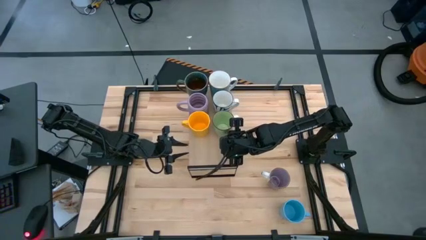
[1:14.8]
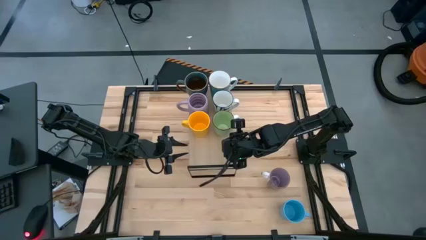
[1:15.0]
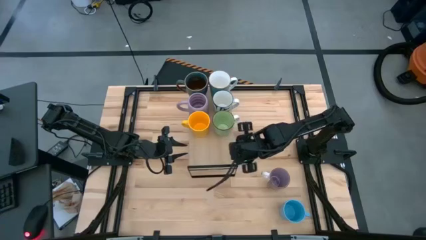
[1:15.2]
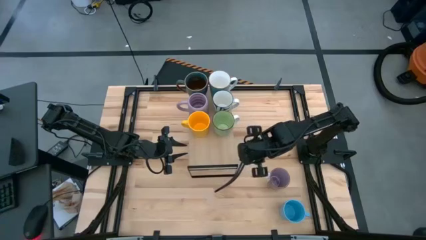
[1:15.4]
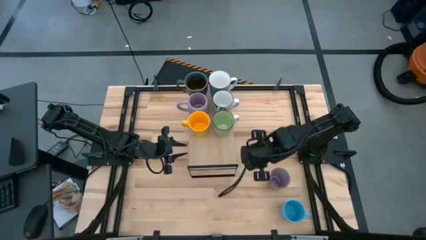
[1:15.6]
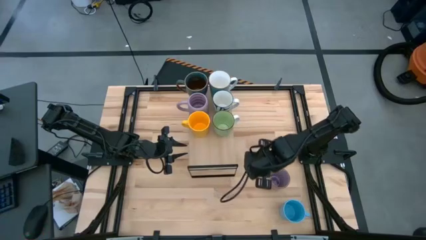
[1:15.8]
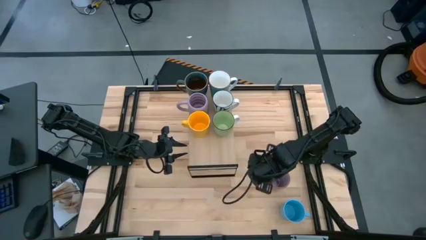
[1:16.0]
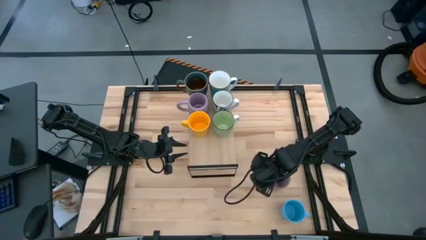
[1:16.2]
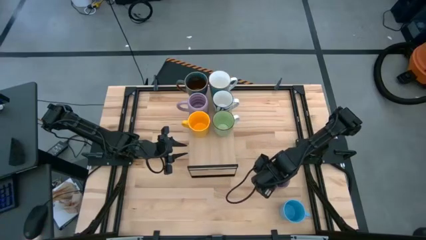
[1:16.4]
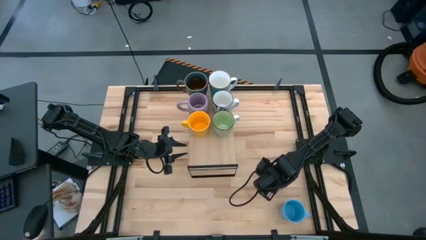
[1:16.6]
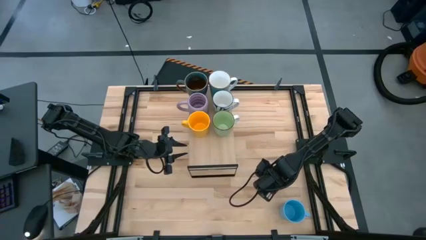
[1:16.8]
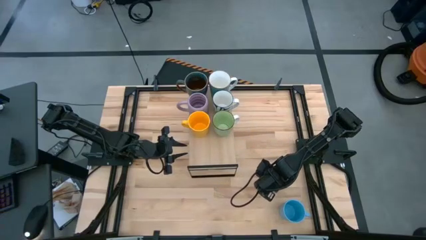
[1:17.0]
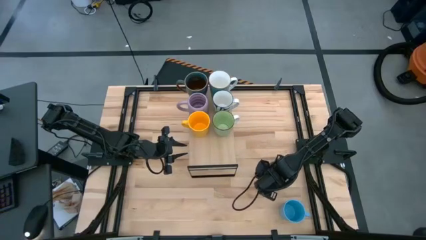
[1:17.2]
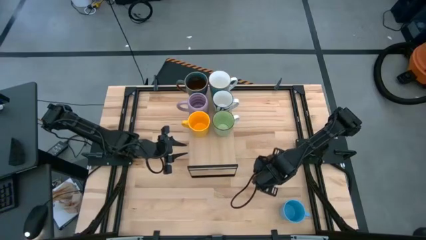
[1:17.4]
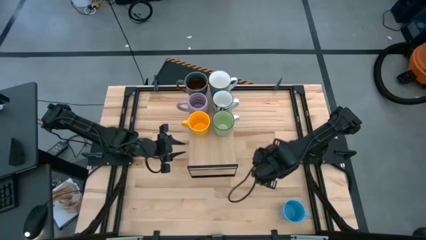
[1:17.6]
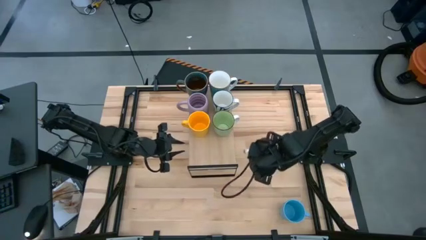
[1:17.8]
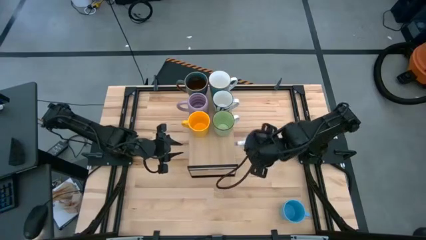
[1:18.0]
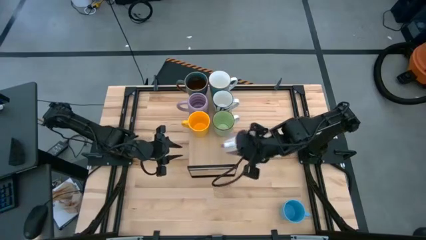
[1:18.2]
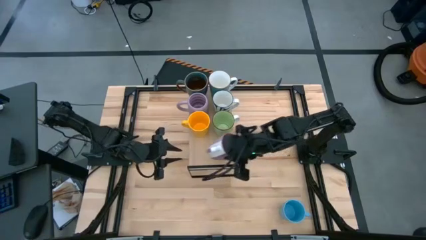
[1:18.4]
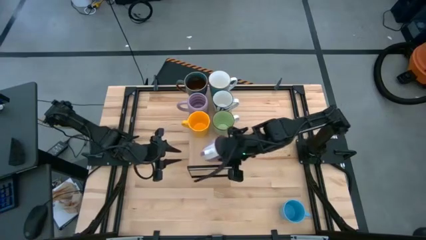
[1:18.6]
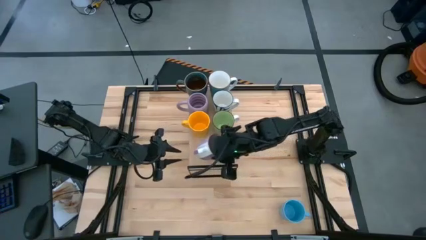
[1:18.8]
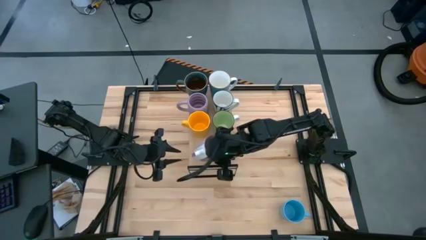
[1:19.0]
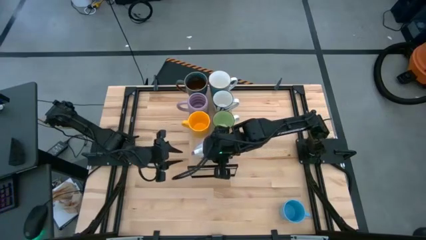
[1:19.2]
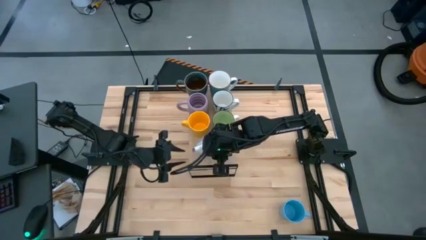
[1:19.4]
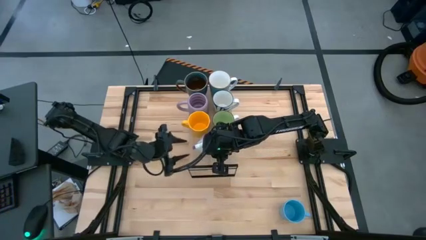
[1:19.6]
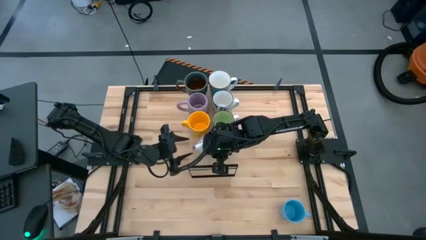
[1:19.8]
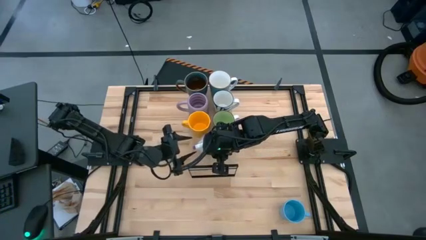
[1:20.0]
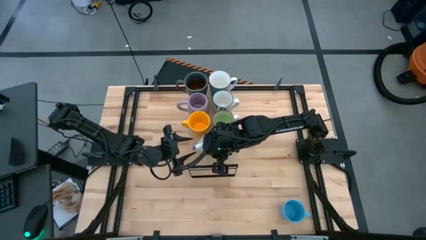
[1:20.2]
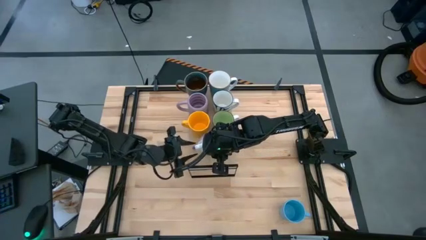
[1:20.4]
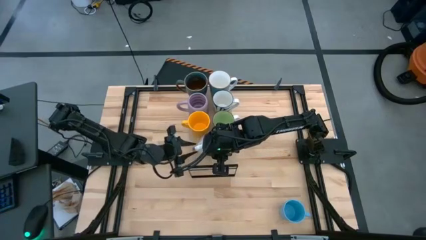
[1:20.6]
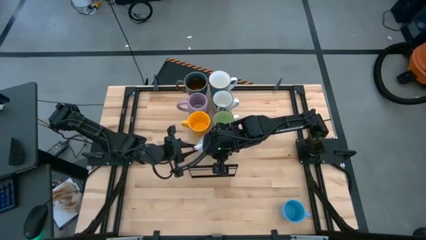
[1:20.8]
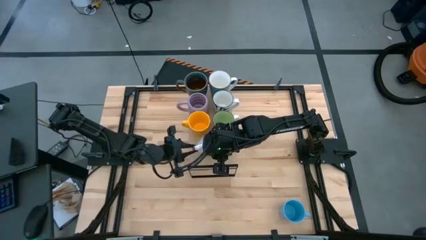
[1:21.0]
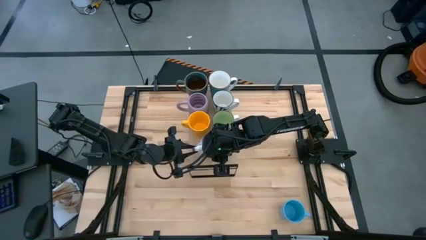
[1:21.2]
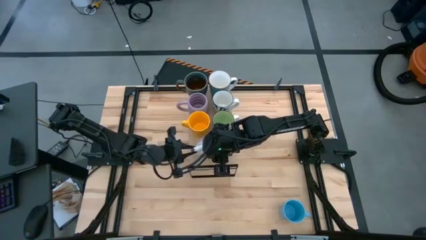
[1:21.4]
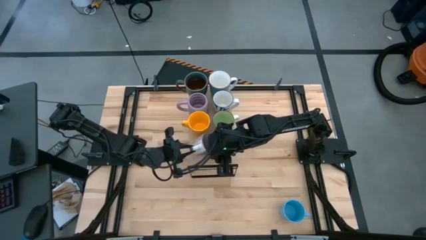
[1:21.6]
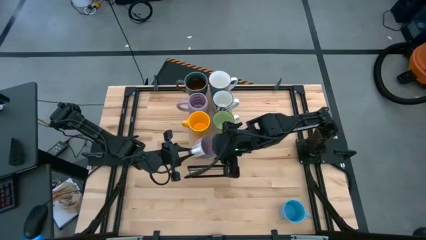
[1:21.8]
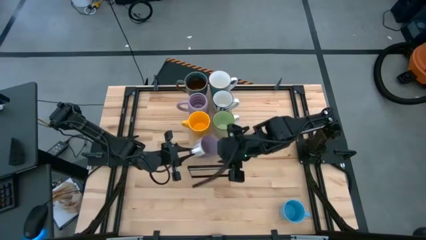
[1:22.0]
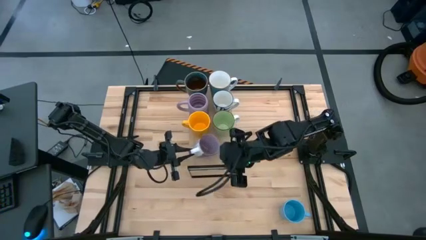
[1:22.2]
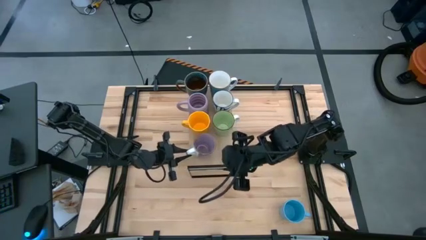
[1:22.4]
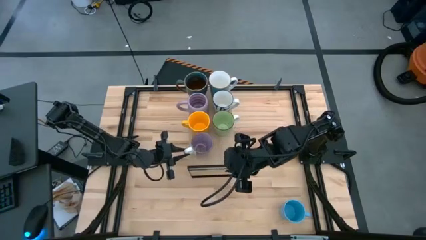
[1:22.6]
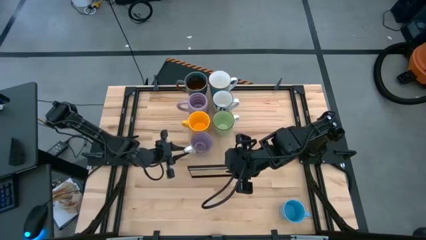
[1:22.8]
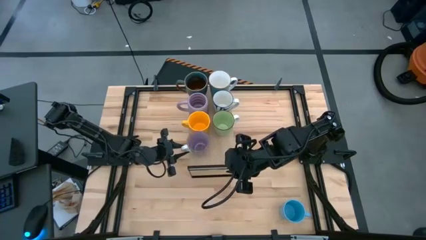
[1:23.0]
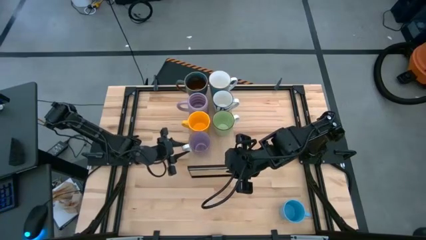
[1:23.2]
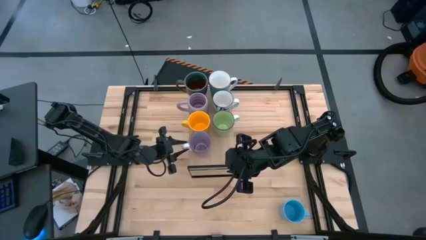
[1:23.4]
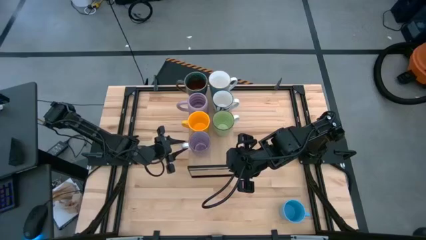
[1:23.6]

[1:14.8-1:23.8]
Task: Place coffee mugs
Put the purple patterned mug on the shelf

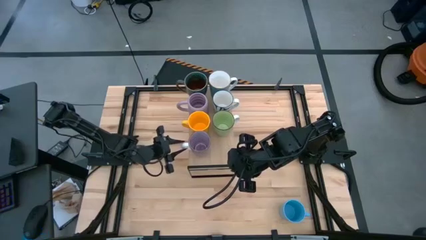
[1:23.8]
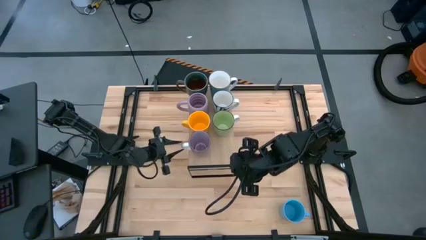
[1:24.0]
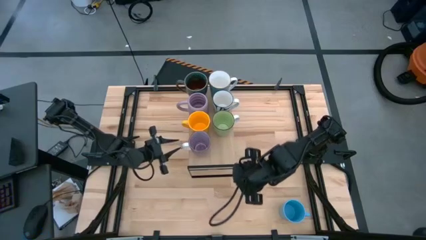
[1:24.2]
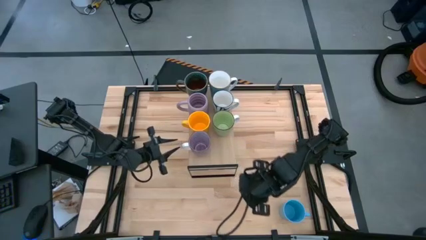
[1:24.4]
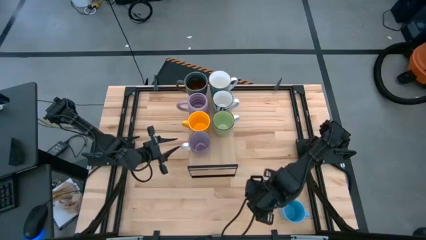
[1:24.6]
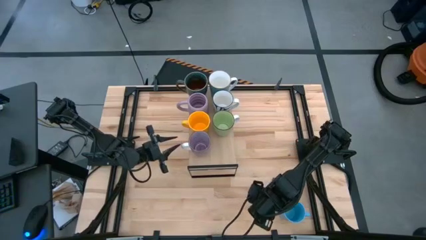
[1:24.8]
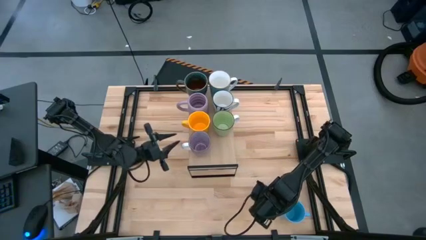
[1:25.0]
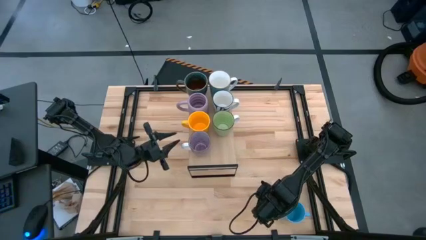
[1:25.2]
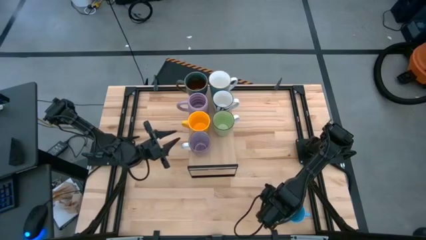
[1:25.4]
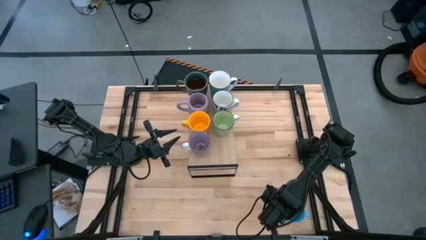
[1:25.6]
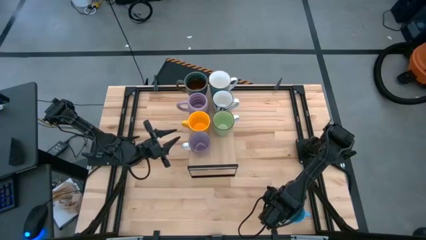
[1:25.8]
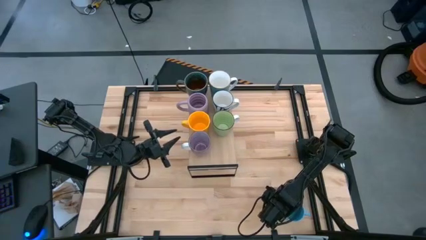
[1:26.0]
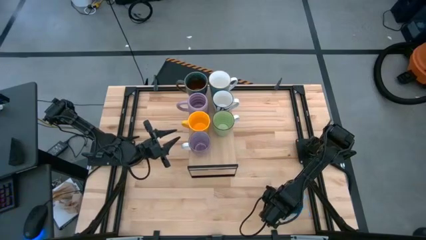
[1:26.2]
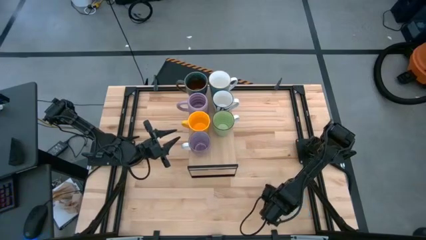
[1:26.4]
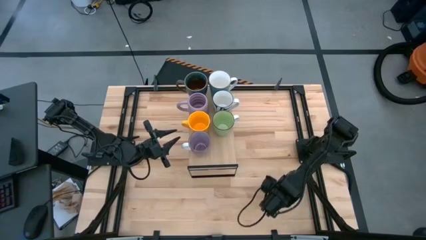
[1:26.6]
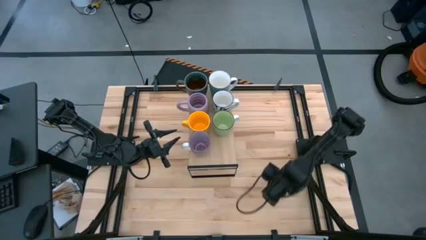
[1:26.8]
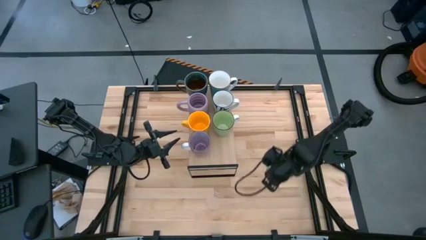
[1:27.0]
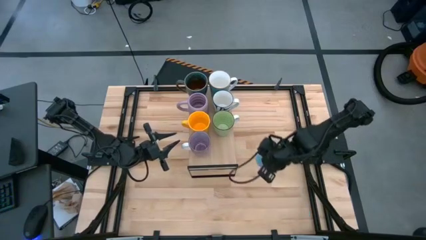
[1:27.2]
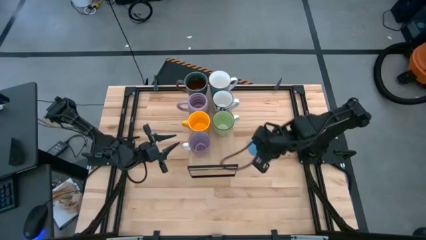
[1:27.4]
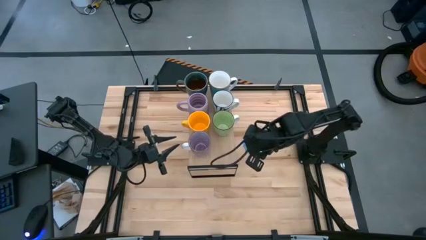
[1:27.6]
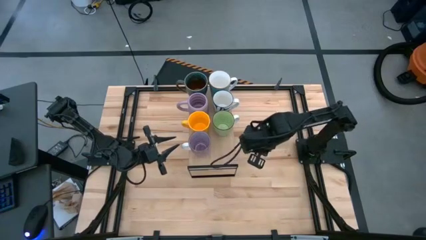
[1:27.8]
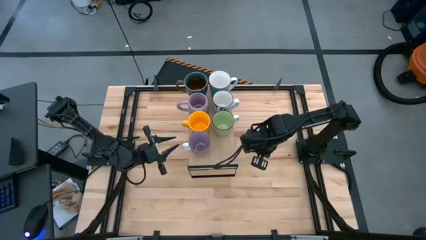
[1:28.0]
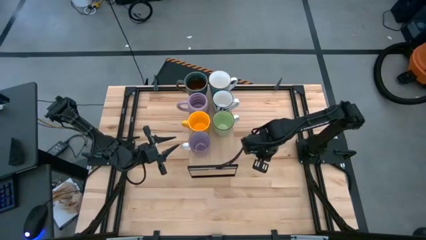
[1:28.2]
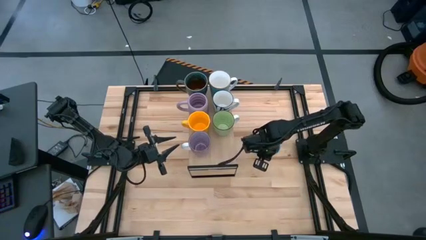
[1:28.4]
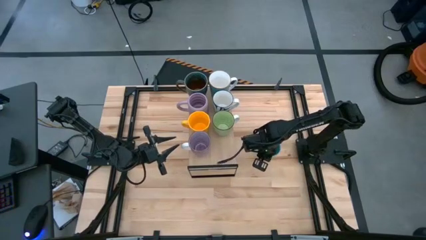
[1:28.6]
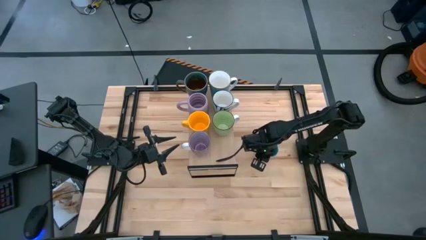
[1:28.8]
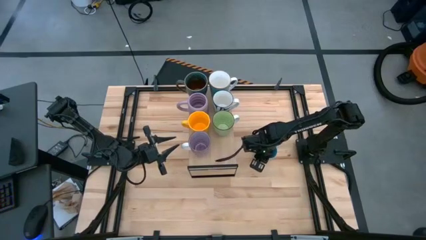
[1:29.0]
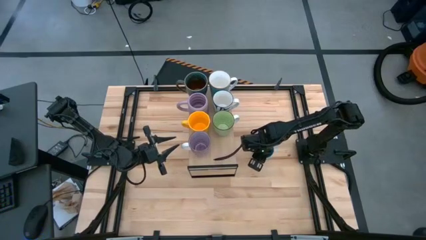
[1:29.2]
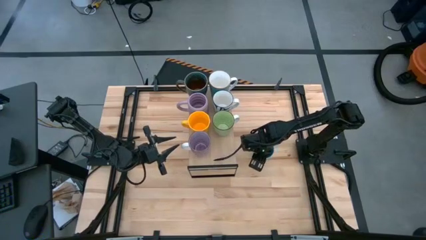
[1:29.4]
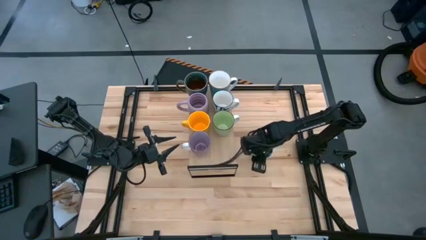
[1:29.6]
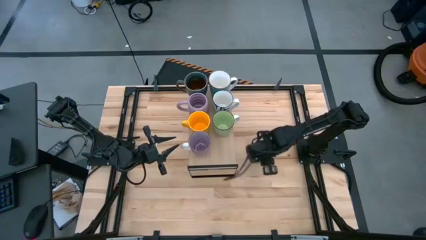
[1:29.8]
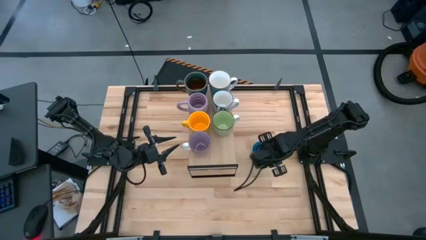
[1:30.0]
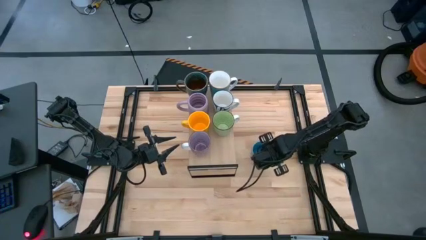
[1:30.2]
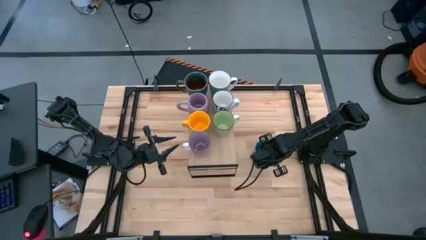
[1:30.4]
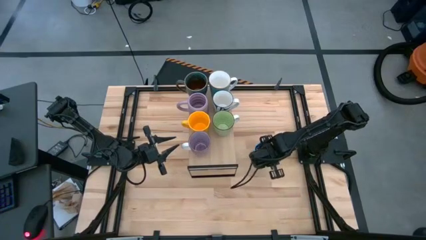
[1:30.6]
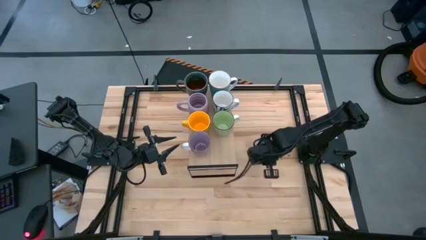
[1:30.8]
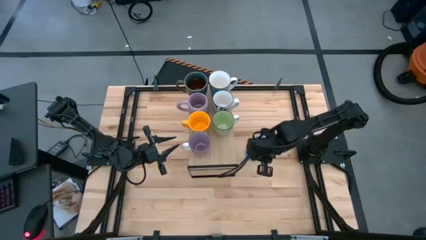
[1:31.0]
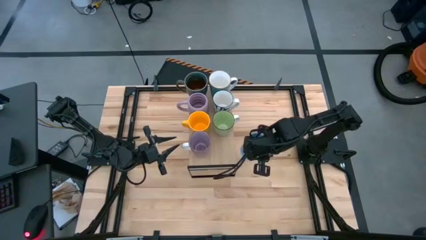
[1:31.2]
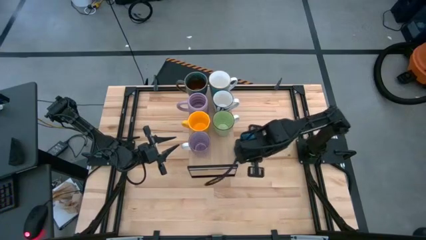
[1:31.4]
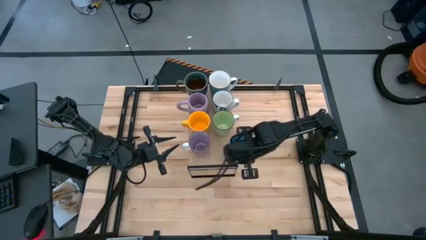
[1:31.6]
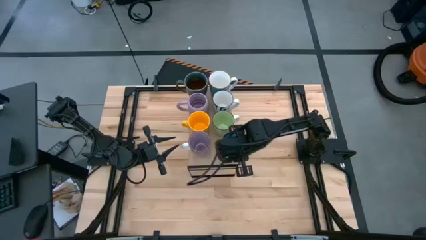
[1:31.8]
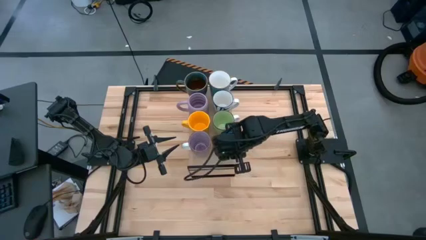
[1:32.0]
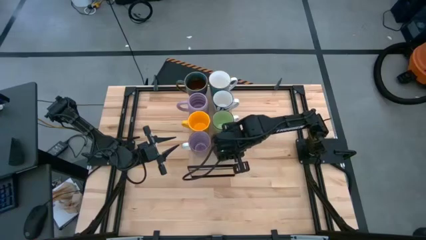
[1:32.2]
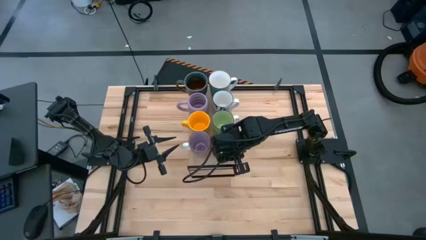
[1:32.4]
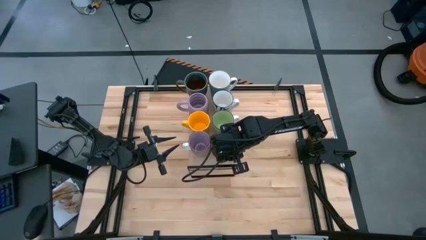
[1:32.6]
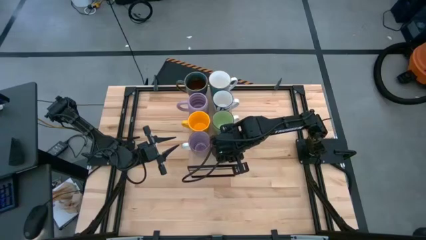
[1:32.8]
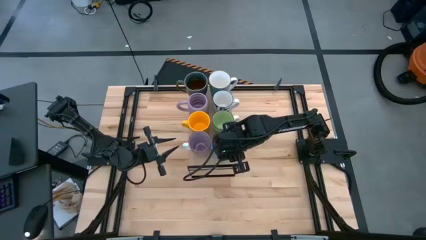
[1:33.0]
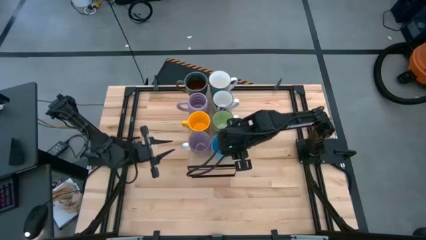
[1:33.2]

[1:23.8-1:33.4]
Put the blue mug on the shelf
